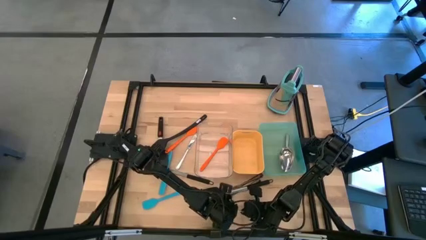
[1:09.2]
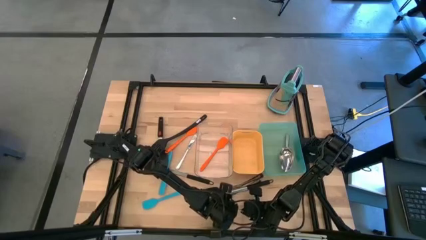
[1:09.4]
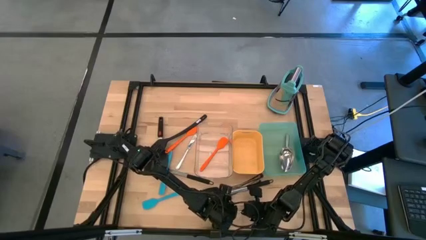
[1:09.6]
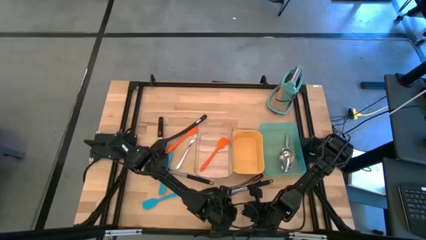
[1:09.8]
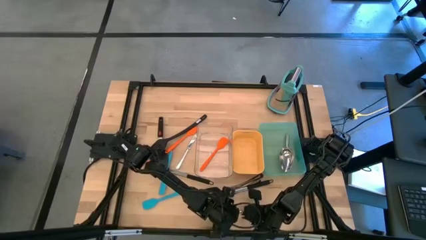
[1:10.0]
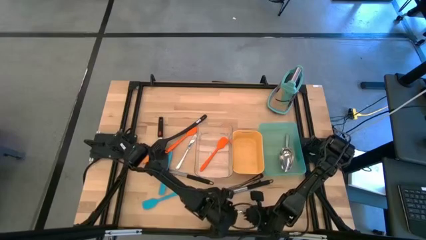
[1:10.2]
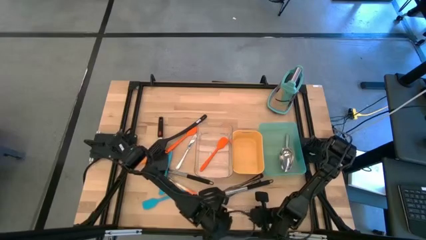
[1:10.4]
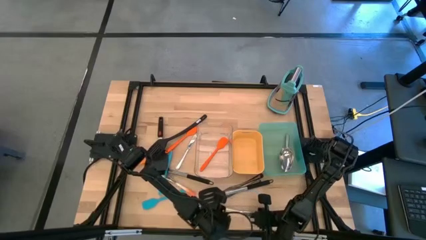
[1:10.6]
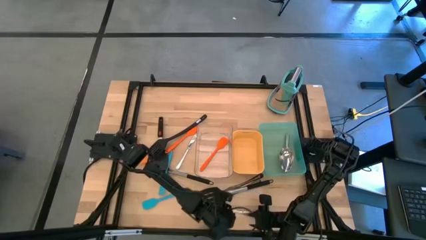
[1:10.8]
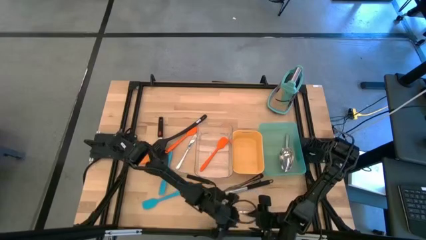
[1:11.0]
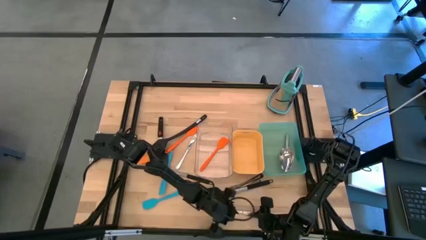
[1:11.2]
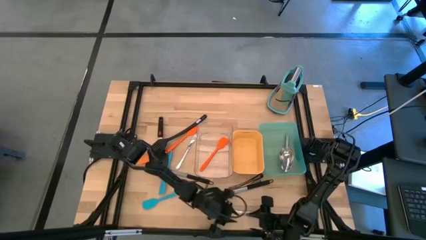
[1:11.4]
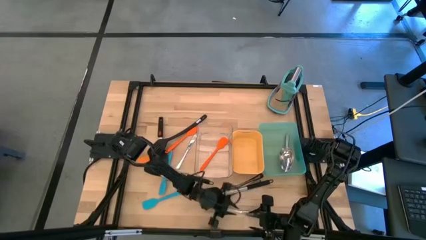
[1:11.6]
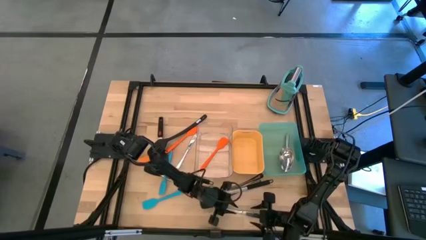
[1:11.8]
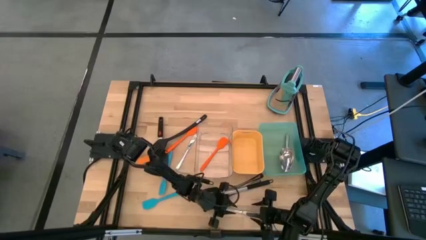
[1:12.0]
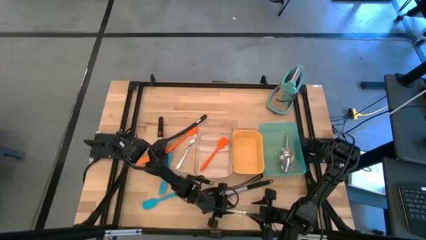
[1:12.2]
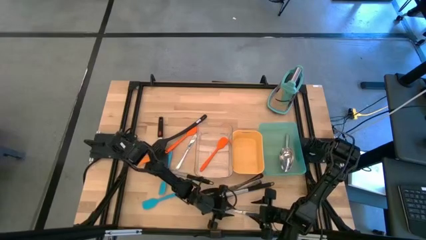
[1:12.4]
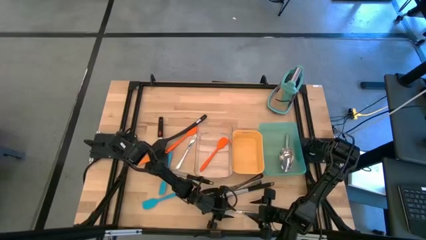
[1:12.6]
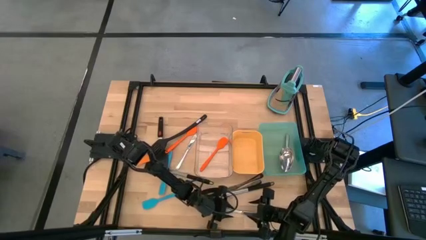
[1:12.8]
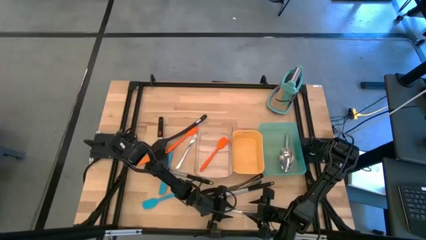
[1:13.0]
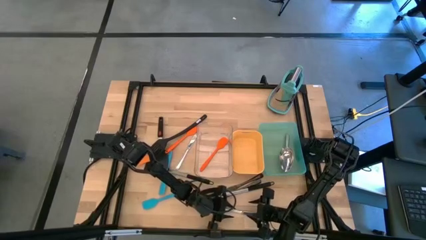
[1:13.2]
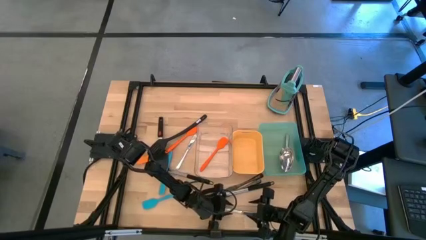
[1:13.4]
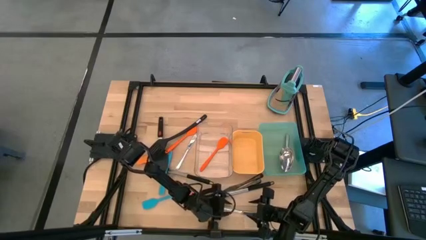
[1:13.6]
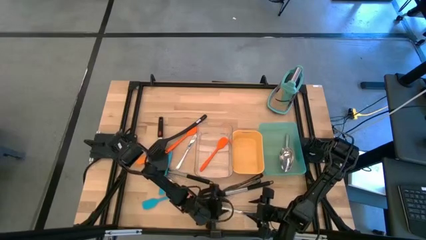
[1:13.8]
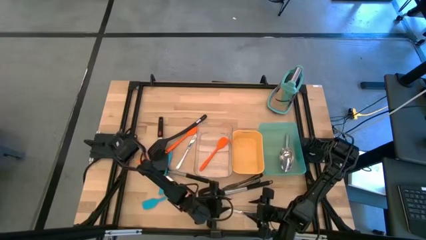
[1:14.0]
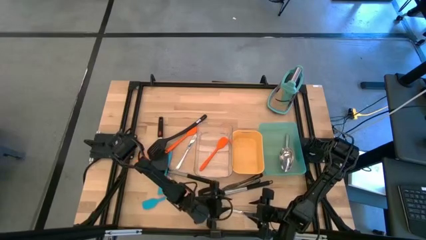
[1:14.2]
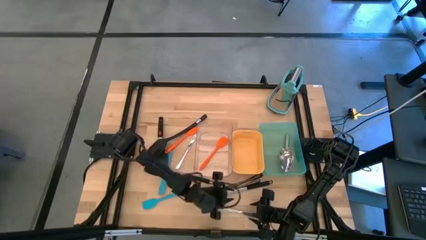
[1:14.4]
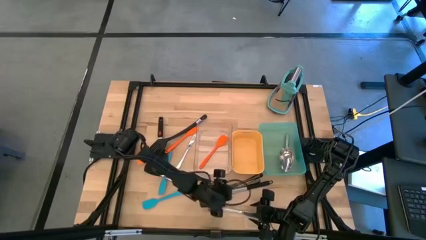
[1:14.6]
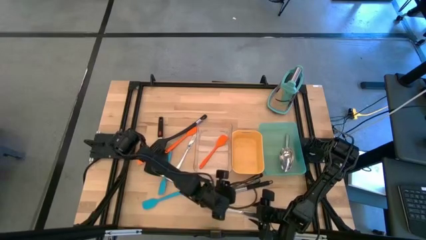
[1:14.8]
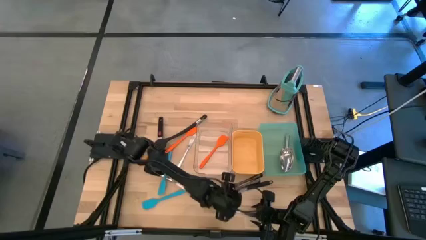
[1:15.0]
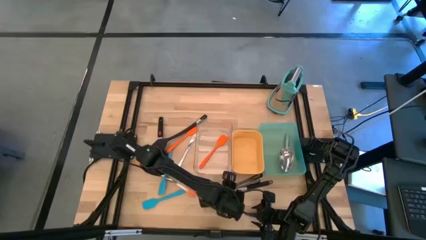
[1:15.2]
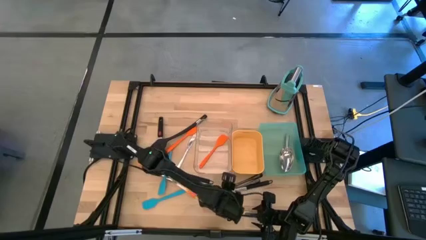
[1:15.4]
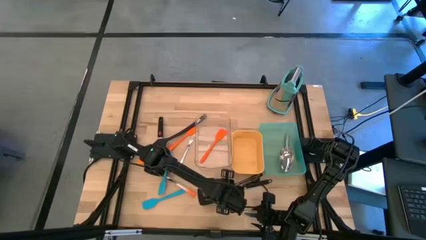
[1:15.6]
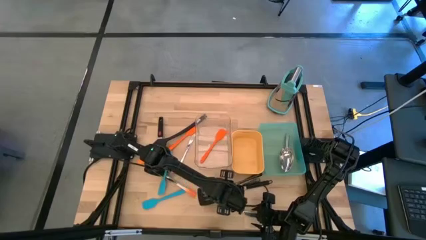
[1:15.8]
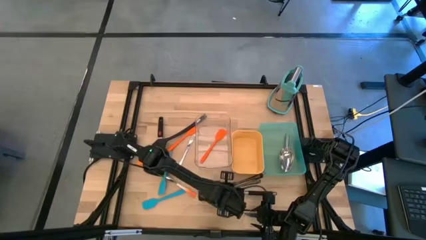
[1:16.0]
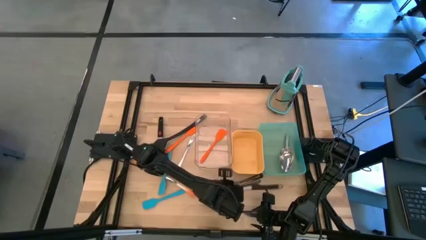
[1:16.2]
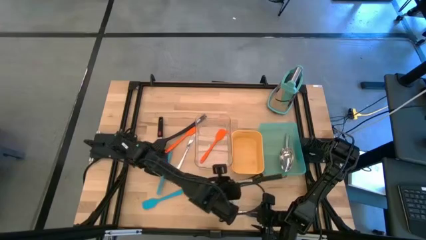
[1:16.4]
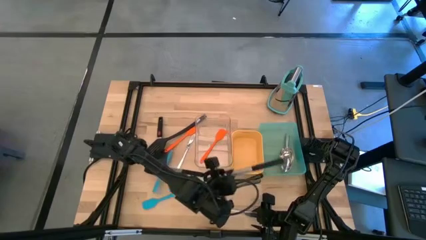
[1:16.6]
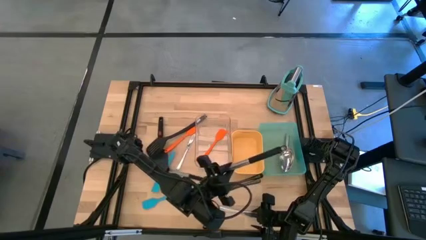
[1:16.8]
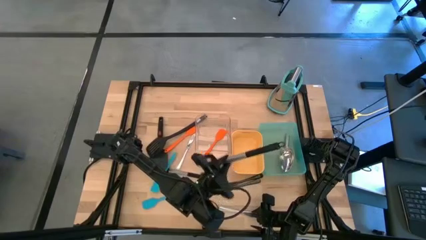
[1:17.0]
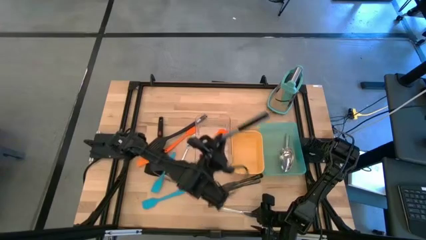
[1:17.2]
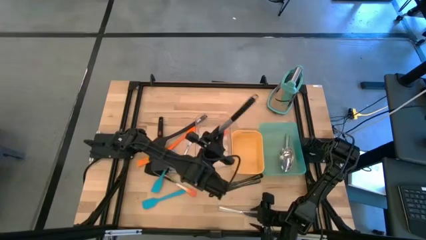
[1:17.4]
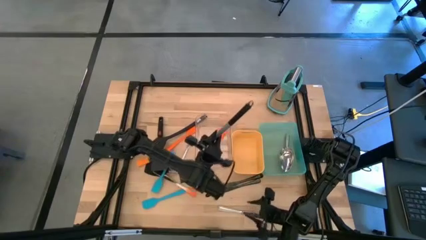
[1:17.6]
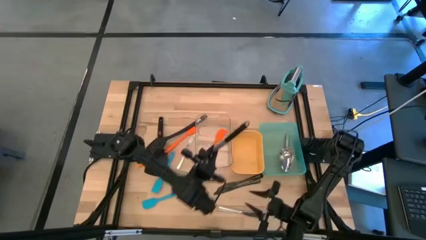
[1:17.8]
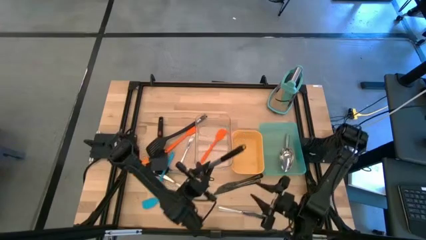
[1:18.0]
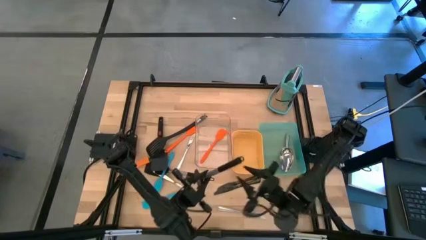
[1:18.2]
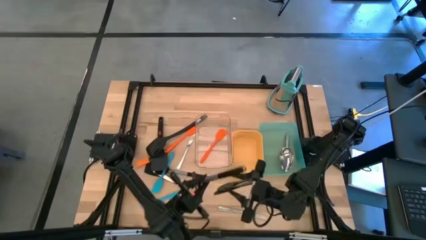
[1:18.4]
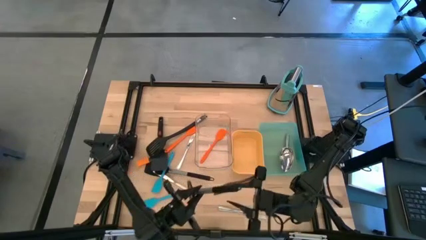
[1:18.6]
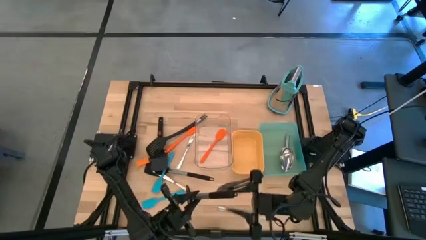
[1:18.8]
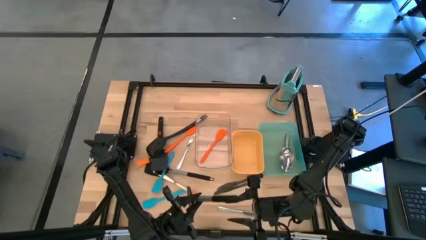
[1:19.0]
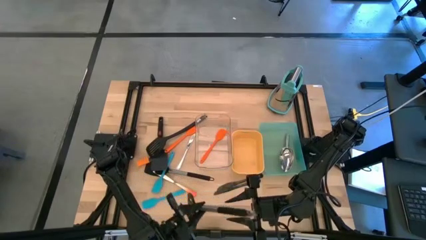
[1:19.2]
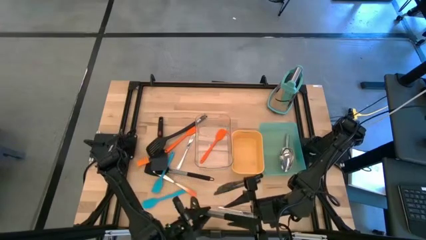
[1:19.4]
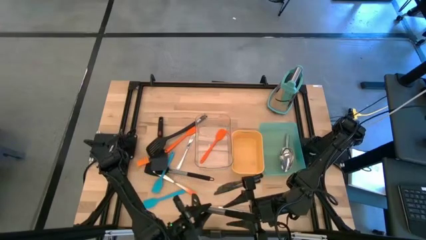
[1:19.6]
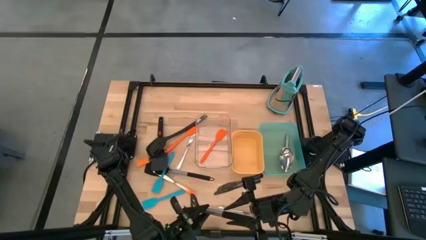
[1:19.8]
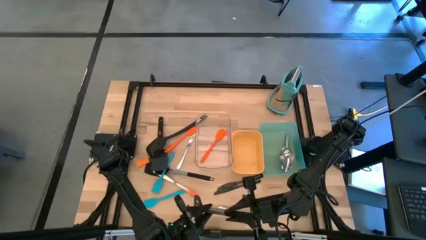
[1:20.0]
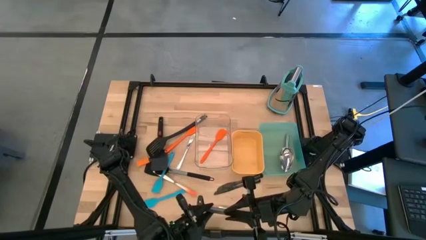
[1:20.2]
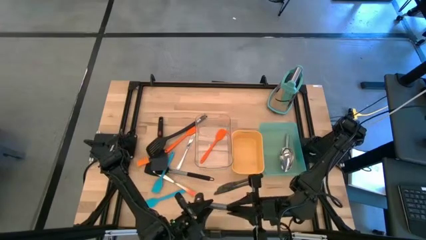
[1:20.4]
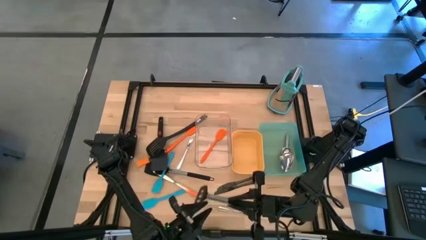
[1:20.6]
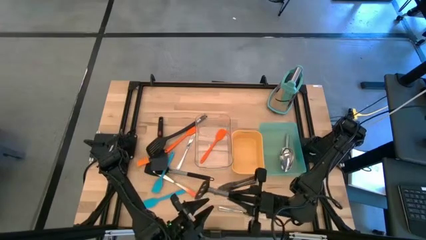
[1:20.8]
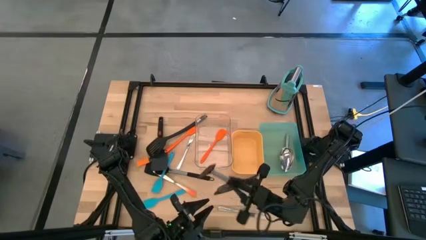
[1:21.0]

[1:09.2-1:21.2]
Task: Pick & Place Kitchen Items
Put the black spatula into the transparent bin
